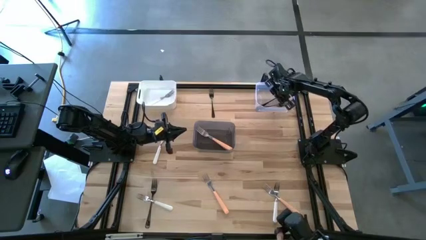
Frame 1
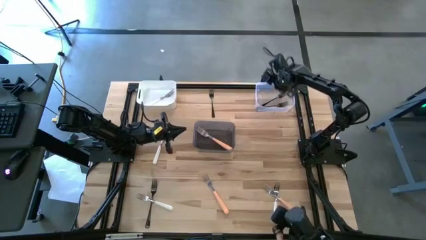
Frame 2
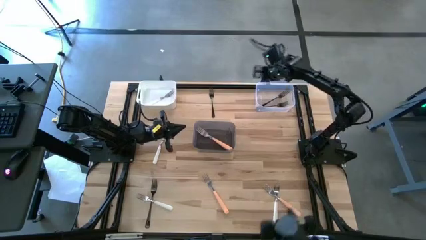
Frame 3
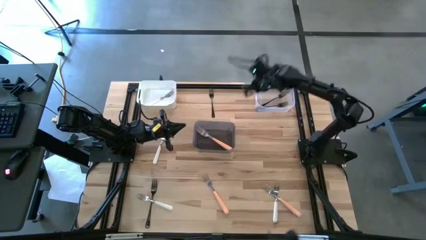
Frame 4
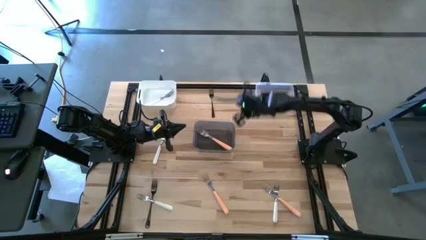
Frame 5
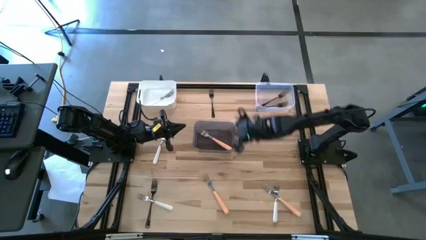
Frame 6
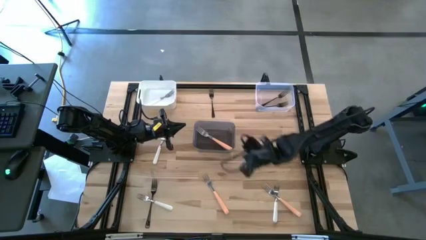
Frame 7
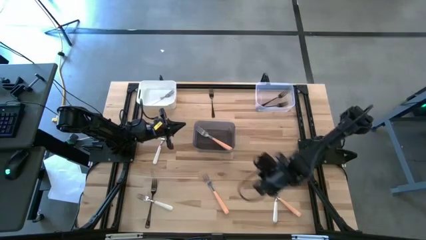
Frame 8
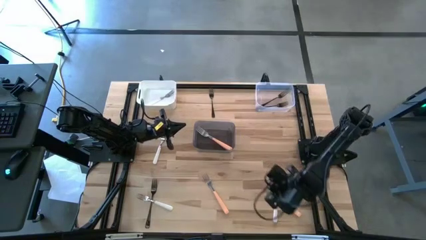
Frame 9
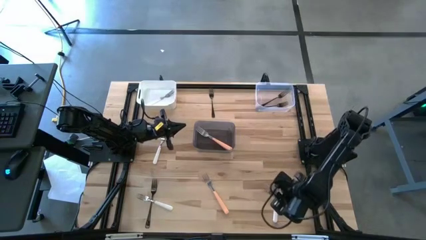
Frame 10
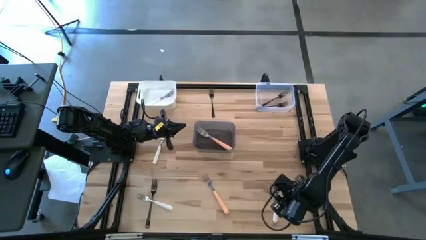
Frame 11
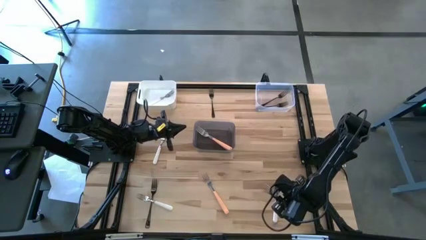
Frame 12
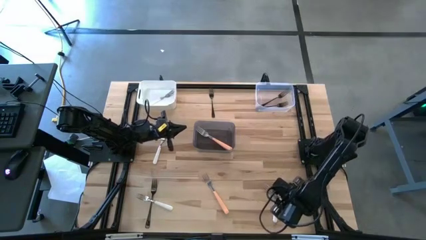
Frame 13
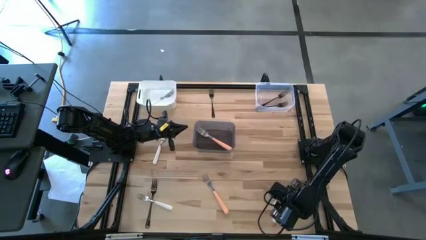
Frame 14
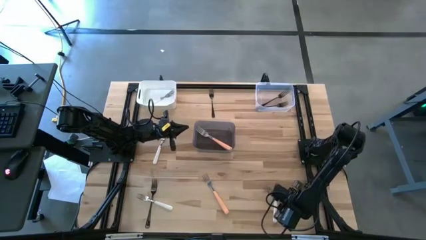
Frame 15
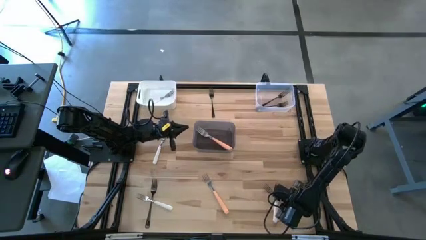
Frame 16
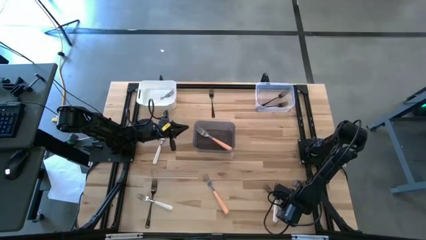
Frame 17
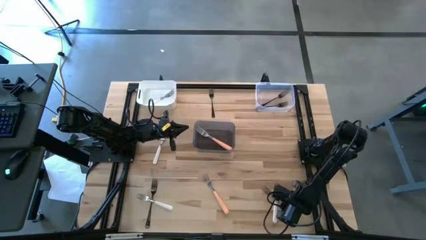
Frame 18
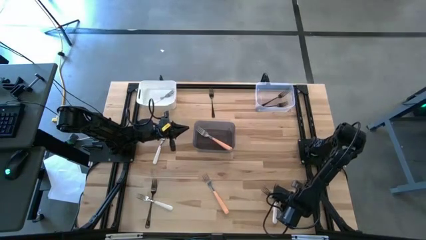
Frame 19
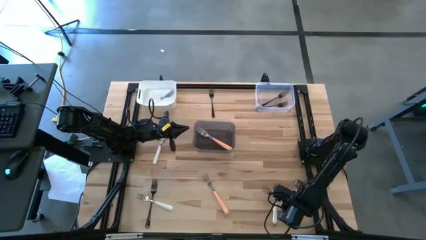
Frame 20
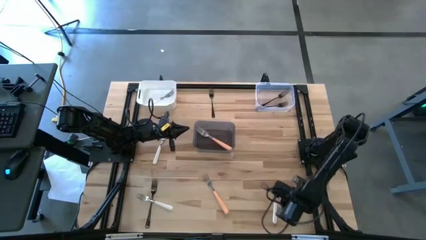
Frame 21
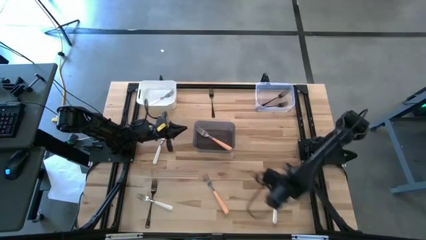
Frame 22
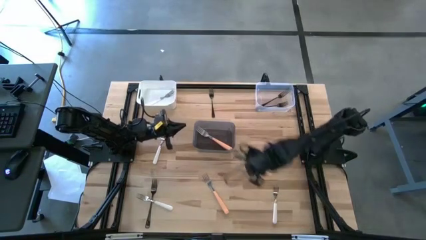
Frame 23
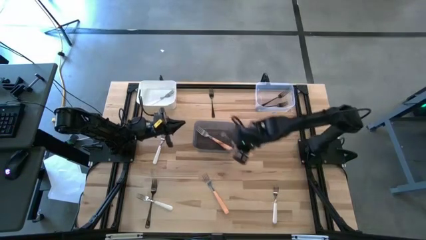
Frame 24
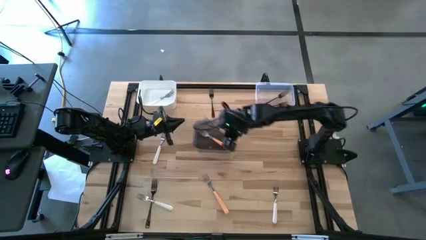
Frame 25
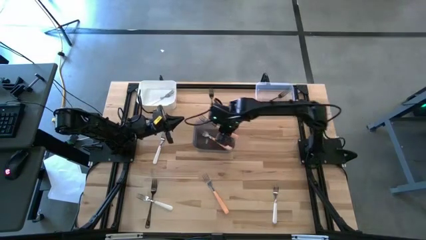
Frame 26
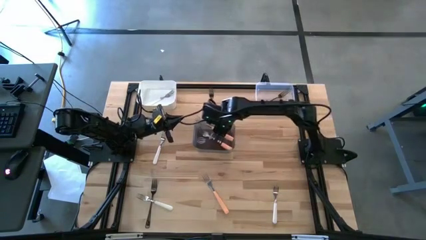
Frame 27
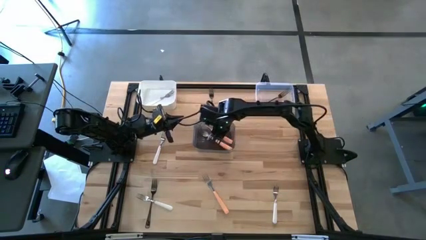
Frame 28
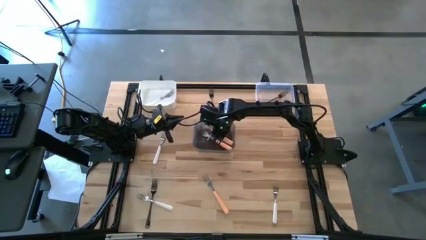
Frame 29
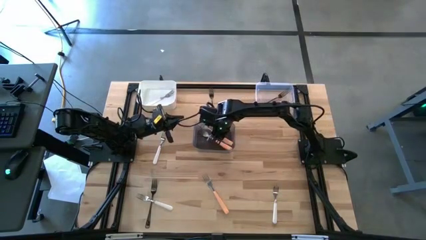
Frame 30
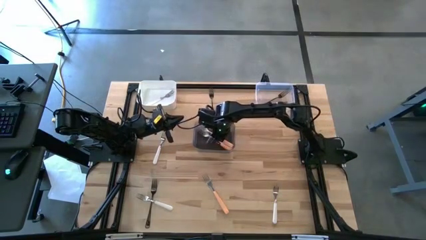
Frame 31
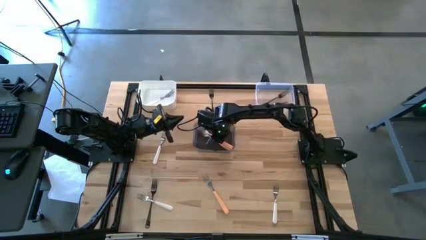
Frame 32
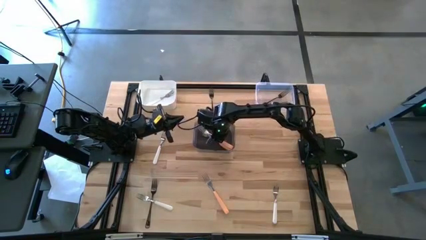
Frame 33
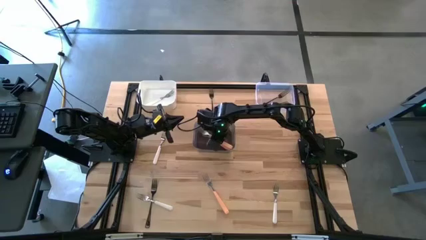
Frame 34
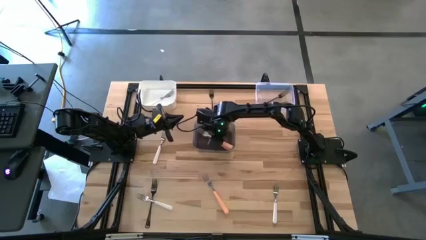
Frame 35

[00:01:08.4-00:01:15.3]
Task: Sort silverware by color (type)
Put the right orange fork into the black bin

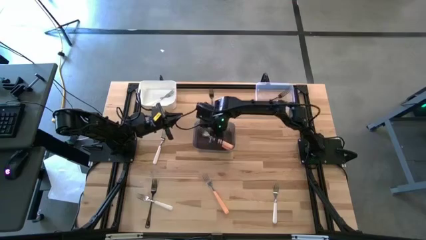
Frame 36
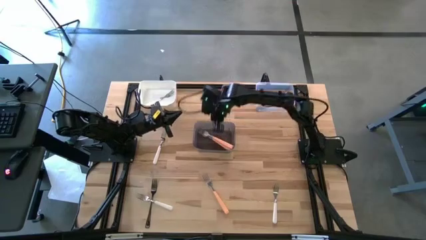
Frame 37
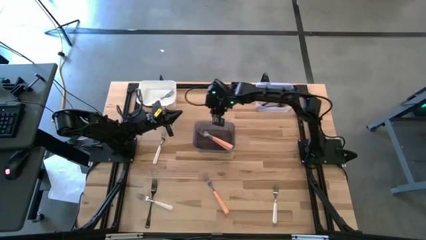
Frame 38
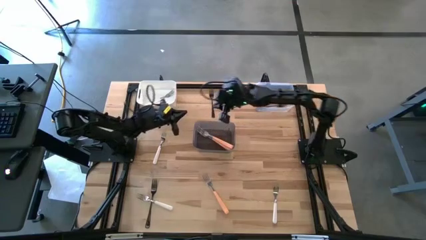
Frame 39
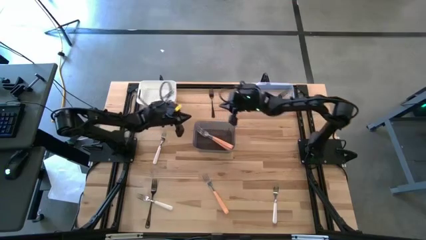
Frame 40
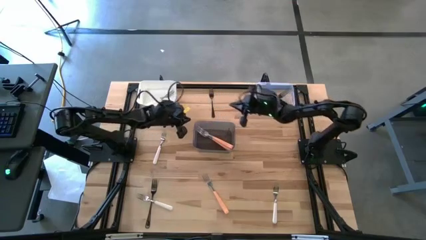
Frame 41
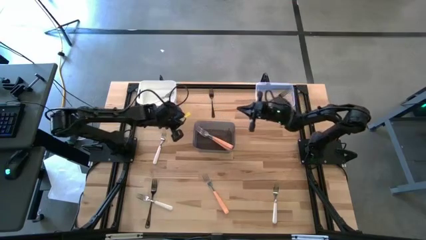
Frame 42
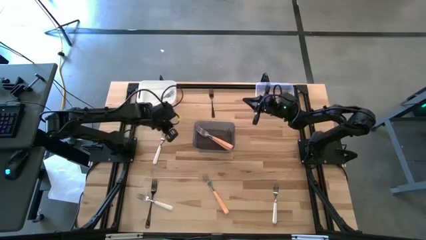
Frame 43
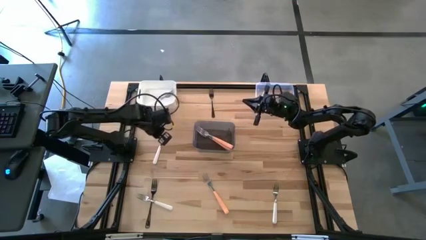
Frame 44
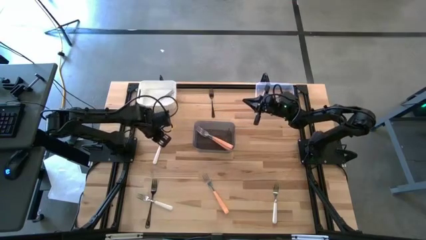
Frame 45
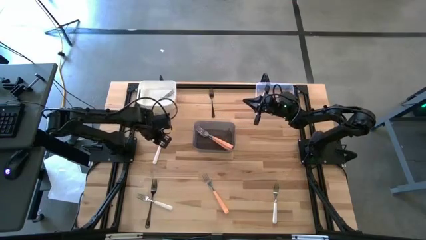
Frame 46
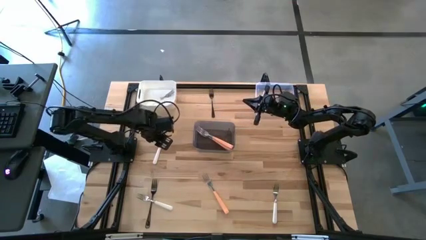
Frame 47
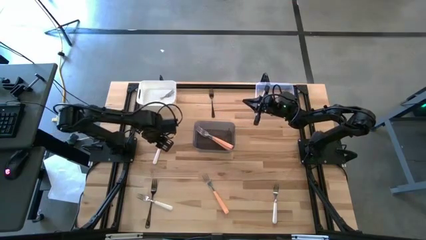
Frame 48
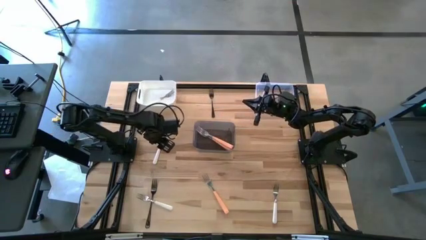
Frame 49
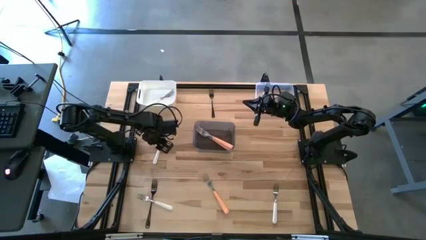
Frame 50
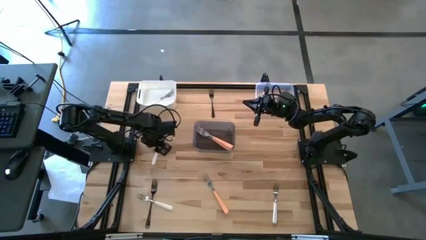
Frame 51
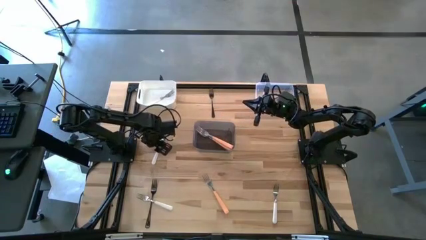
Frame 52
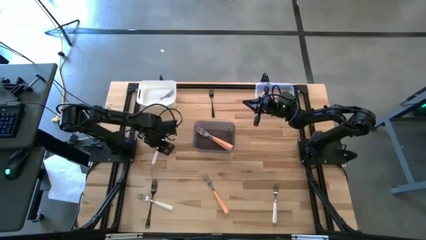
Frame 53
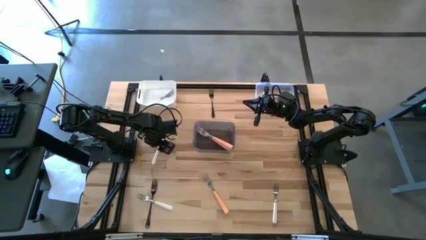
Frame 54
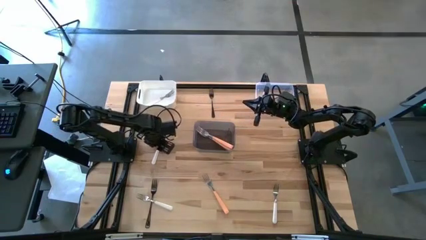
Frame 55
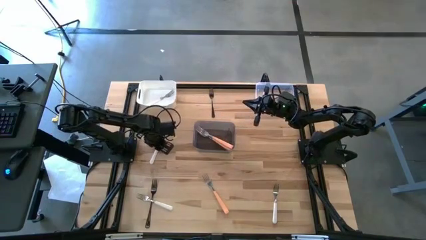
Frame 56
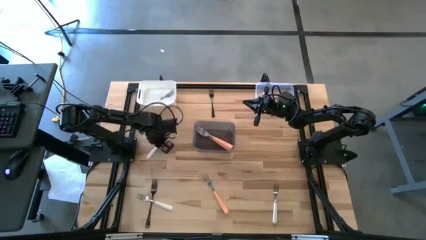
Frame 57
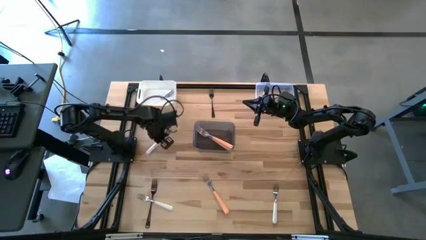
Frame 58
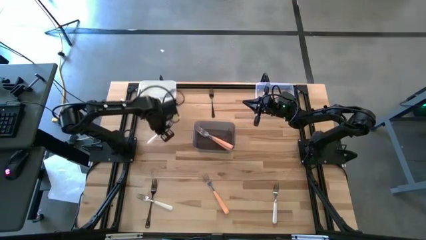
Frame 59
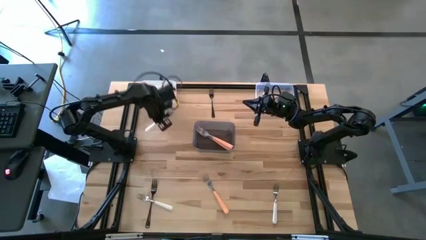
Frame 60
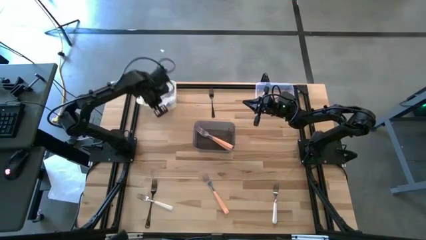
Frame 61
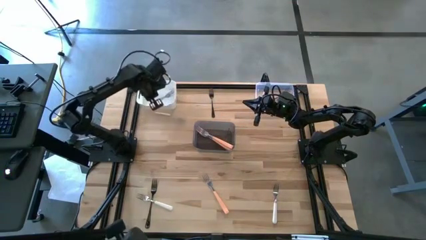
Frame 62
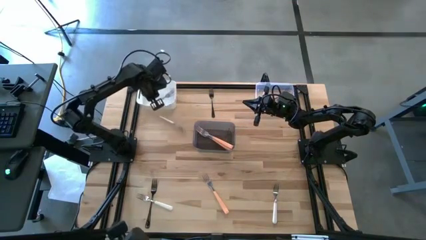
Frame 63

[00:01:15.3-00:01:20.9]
Put the top white fork into the white bin

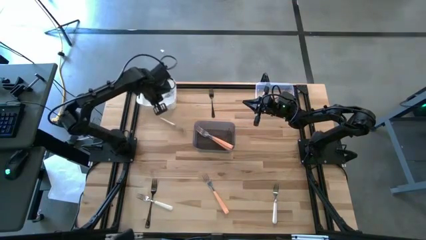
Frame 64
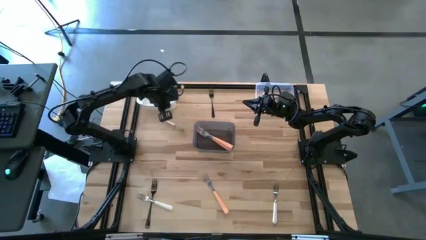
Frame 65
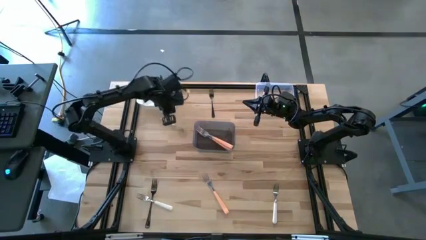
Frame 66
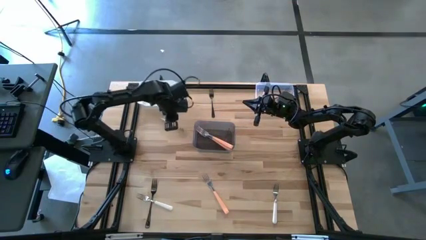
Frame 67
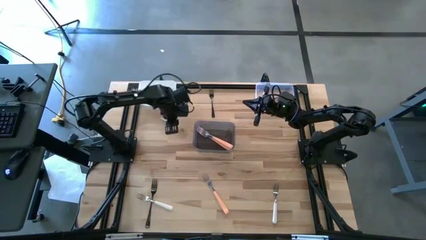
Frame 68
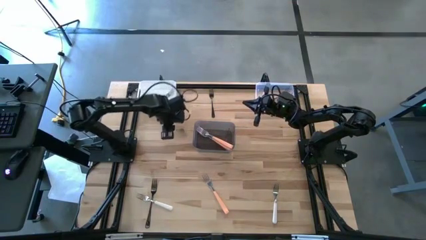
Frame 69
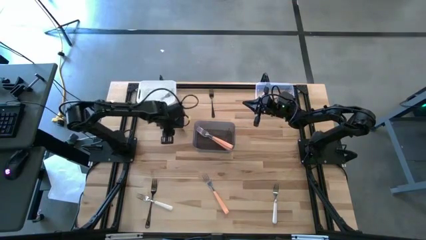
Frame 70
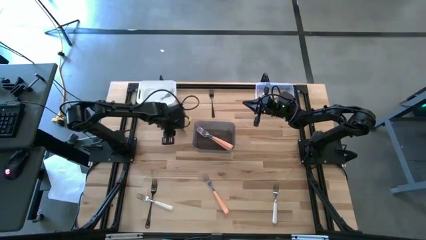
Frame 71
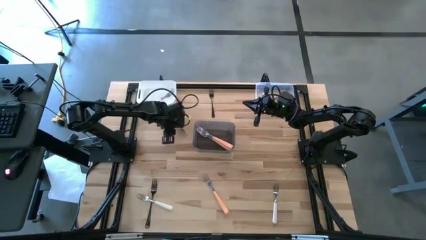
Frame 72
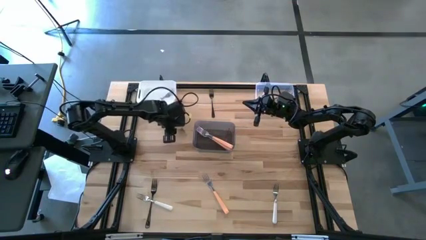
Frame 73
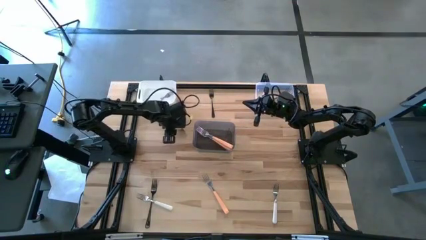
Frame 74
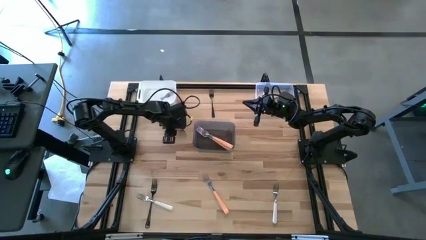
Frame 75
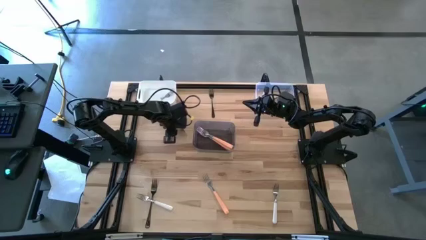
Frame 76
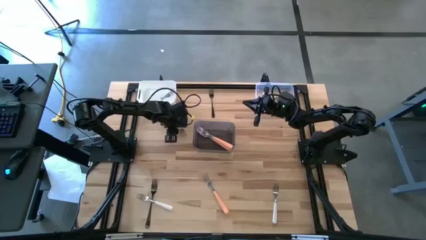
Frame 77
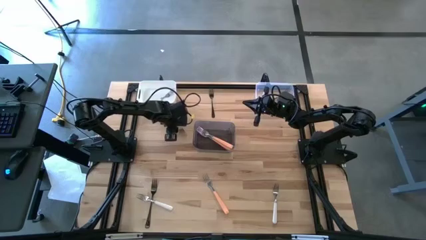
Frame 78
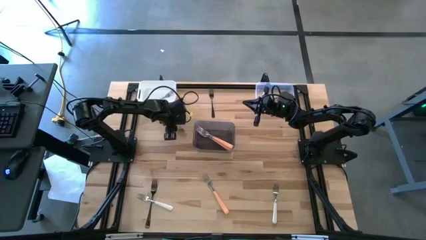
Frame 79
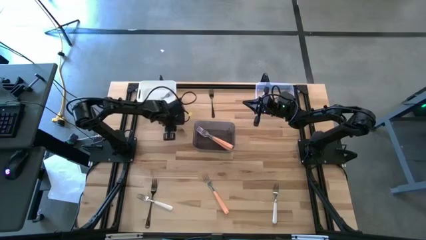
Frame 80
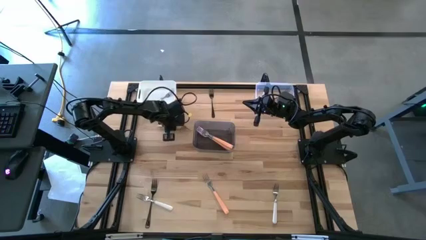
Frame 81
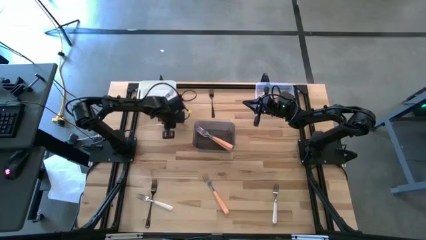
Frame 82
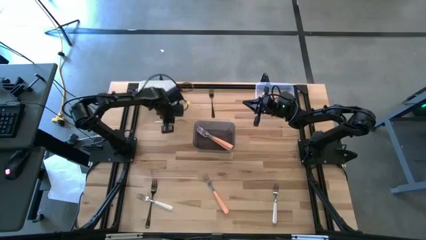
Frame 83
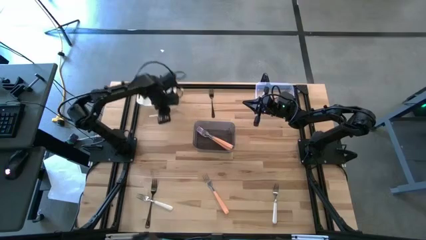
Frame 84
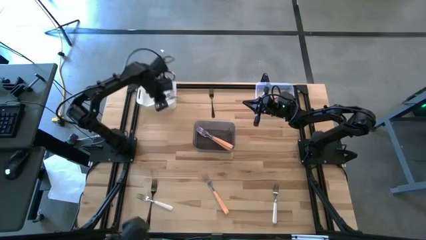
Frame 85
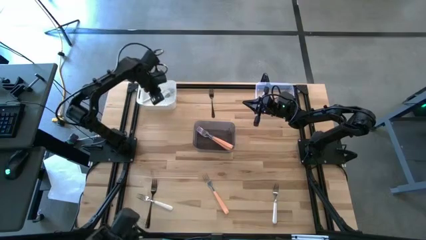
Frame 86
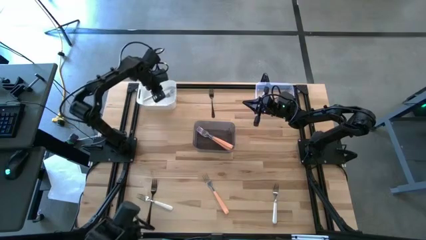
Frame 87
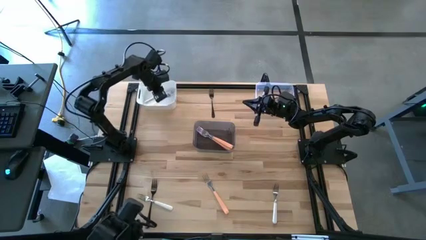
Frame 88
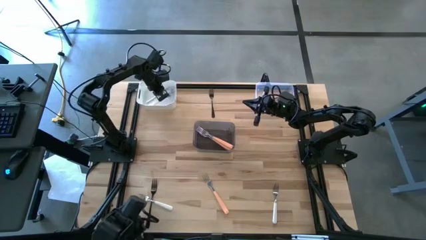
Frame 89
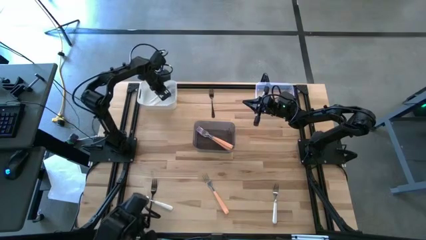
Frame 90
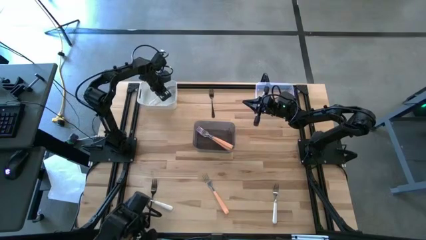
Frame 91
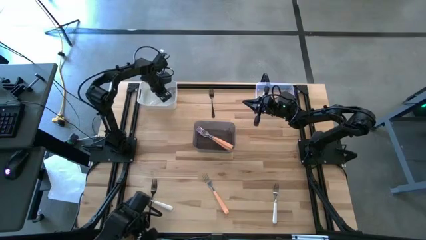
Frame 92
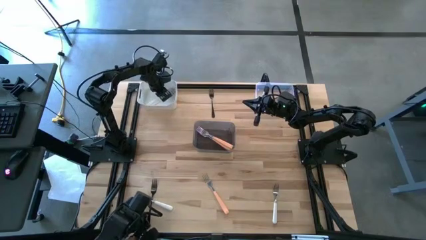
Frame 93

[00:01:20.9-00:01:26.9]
Put the top white fork into the white bin
